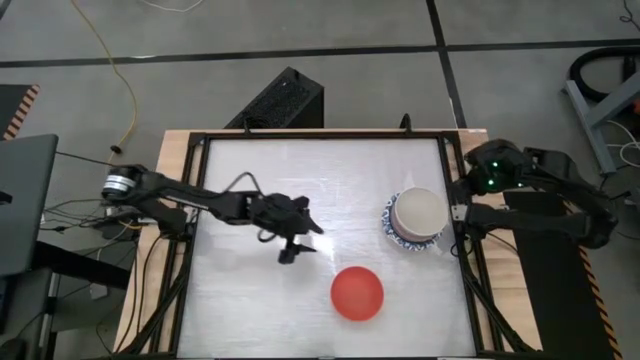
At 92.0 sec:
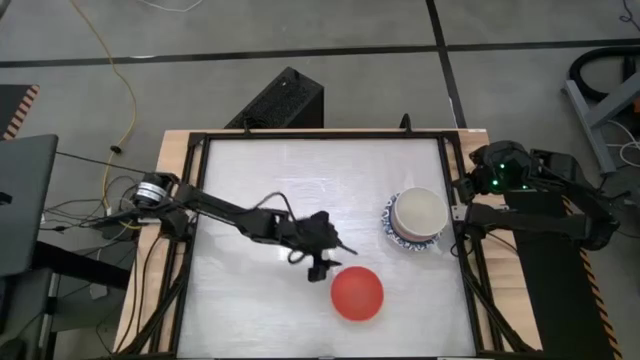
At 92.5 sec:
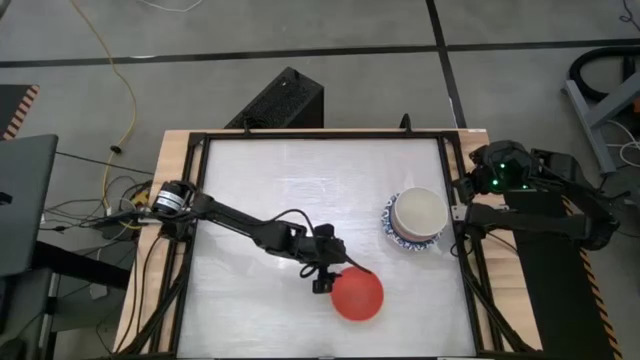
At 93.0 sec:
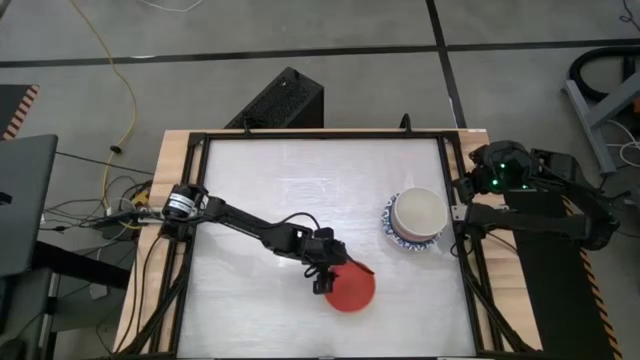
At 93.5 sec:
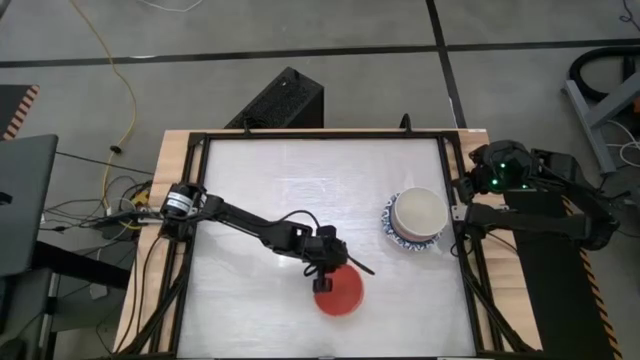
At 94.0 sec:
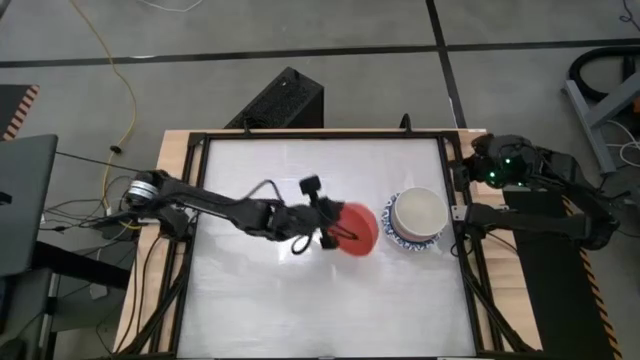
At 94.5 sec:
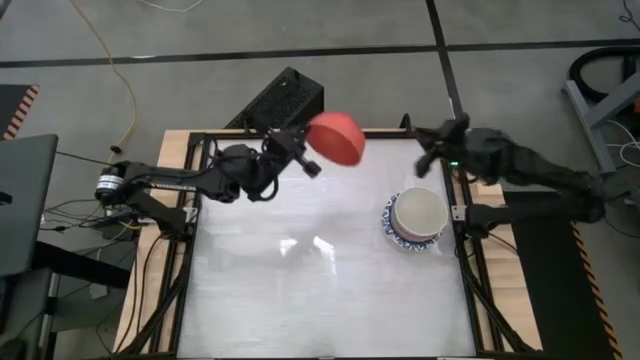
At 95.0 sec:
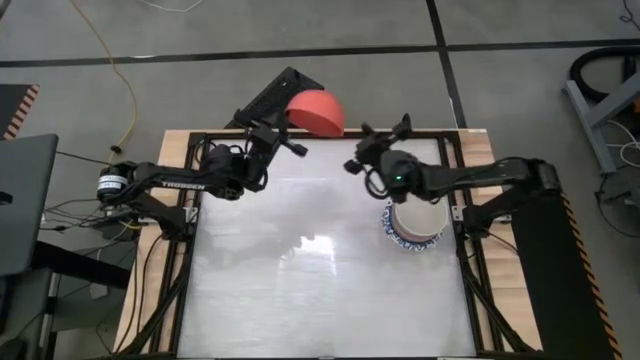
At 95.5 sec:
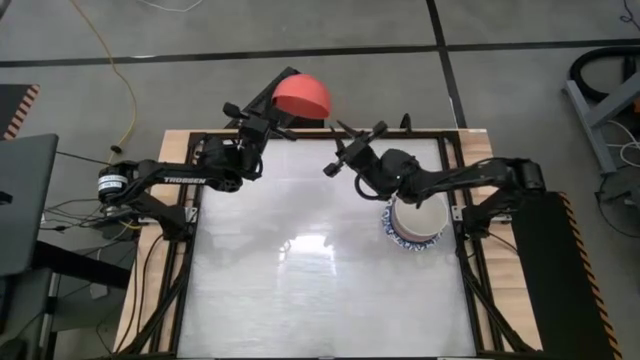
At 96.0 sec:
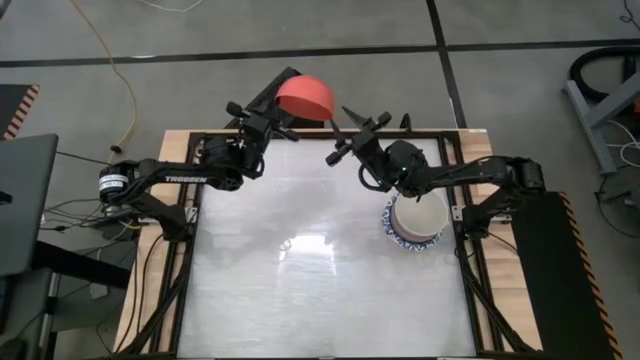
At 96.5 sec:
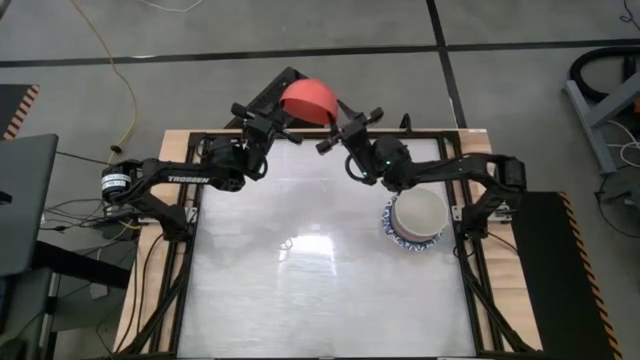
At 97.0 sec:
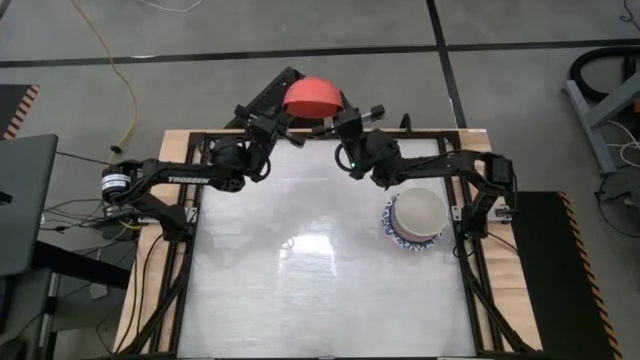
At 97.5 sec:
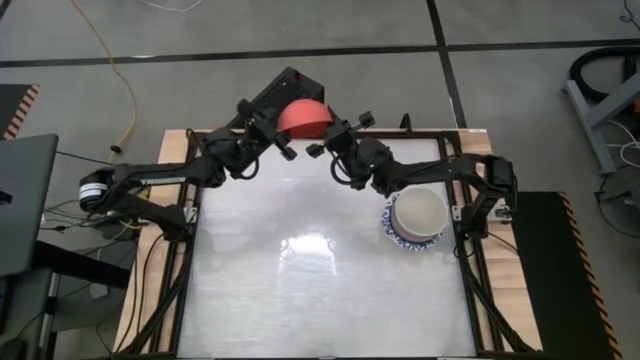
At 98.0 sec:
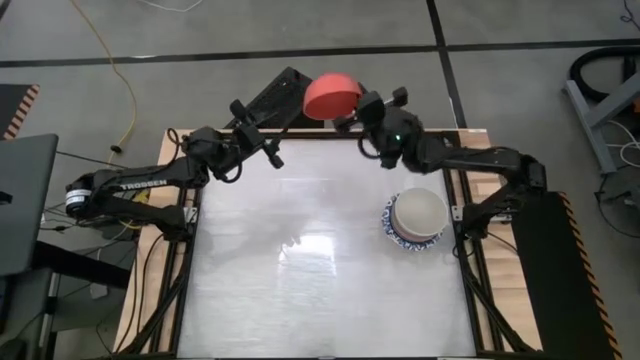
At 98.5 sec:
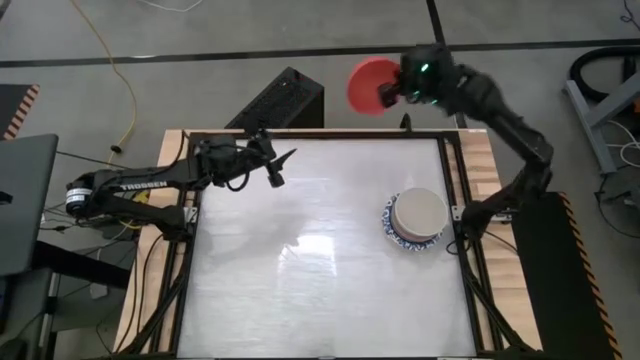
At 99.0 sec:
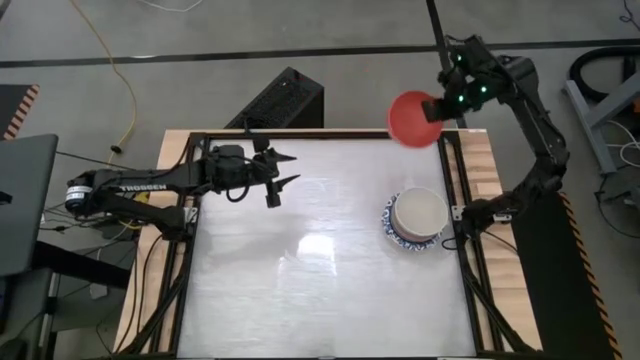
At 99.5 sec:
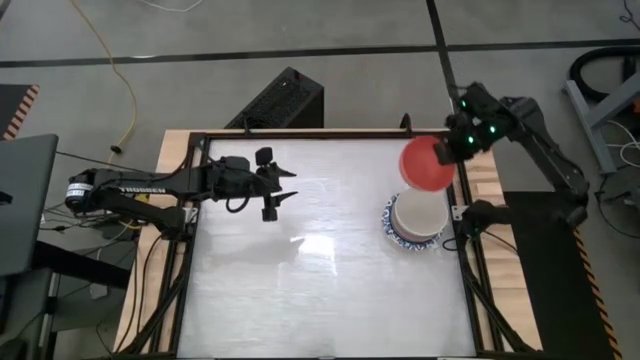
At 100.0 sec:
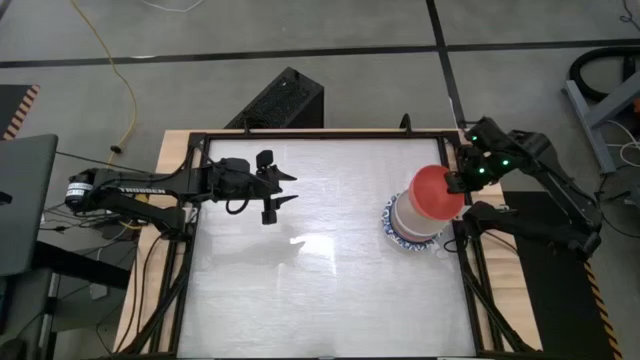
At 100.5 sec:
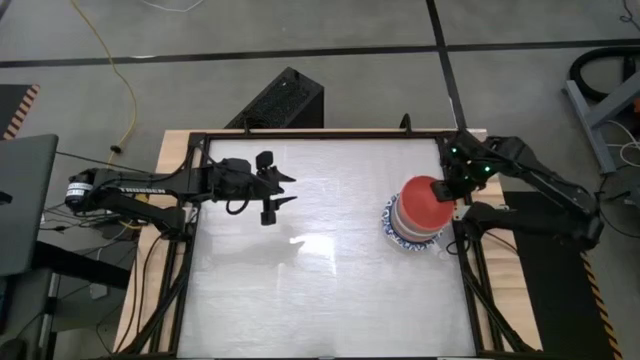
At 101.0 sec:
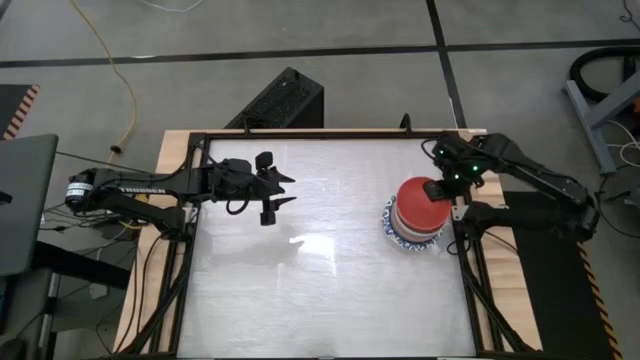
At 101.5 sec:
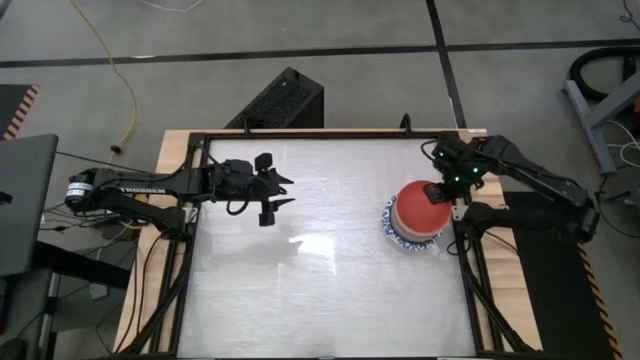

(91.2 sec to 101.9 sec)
Stack the orange bowl on top of the white bowl

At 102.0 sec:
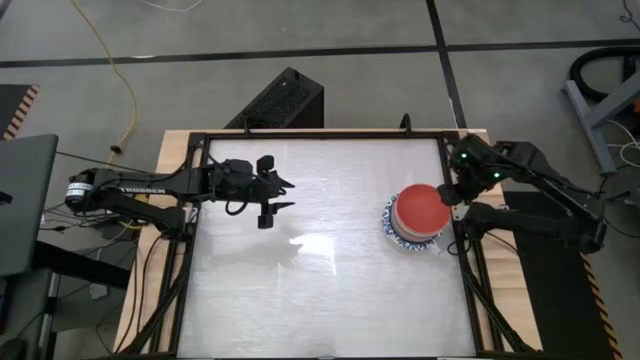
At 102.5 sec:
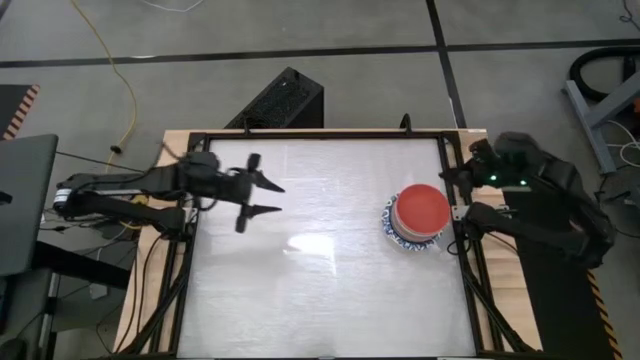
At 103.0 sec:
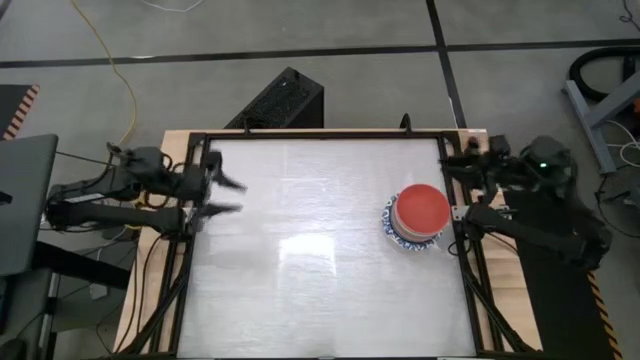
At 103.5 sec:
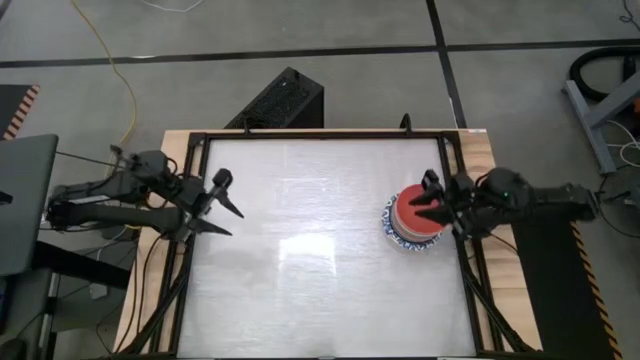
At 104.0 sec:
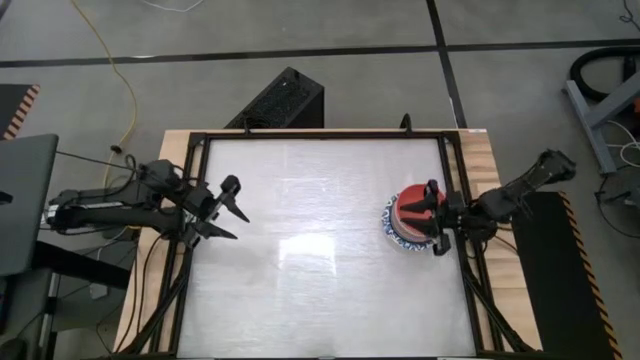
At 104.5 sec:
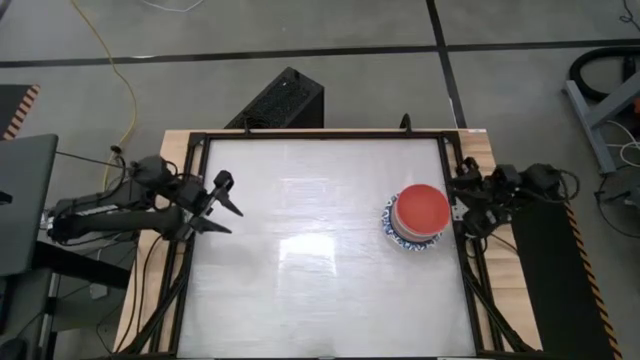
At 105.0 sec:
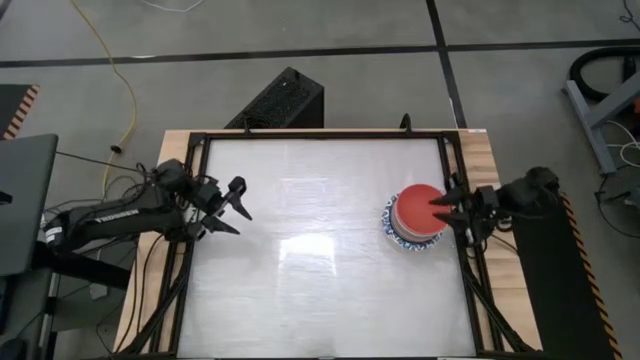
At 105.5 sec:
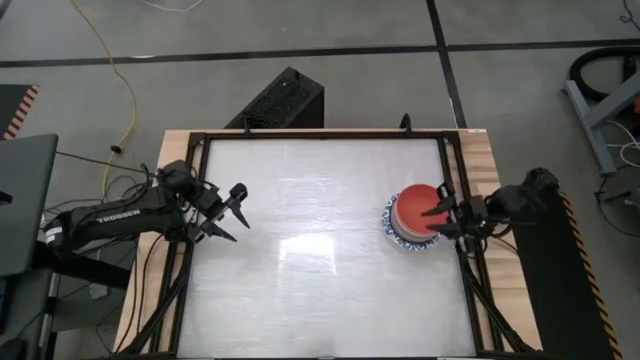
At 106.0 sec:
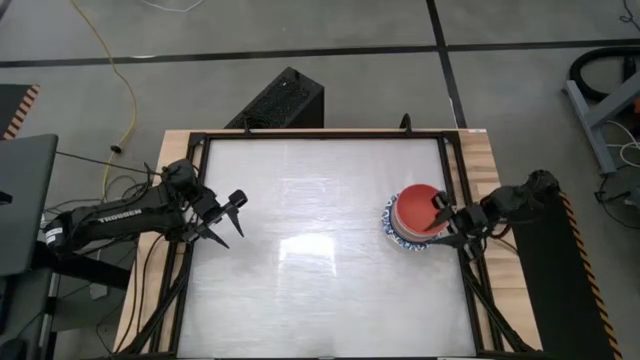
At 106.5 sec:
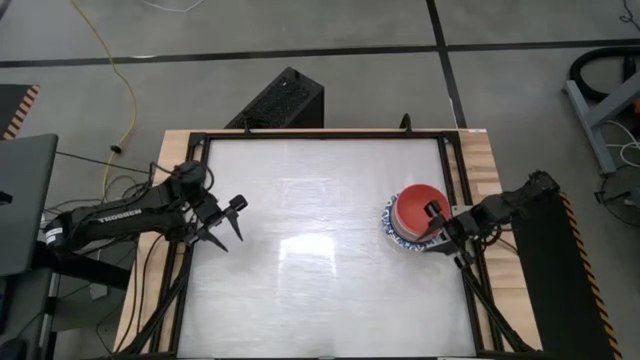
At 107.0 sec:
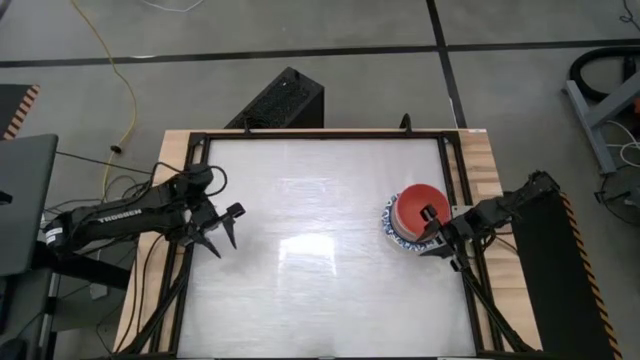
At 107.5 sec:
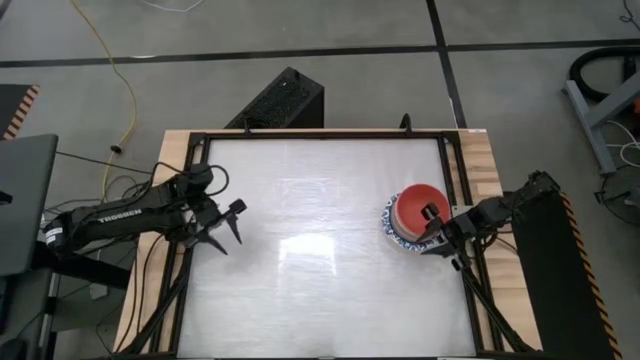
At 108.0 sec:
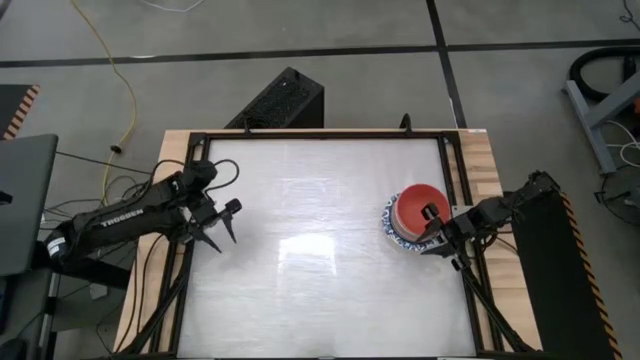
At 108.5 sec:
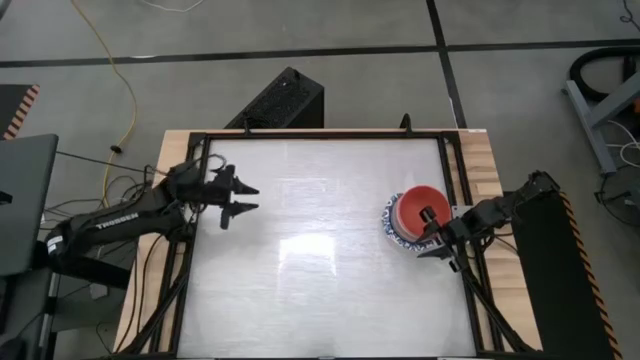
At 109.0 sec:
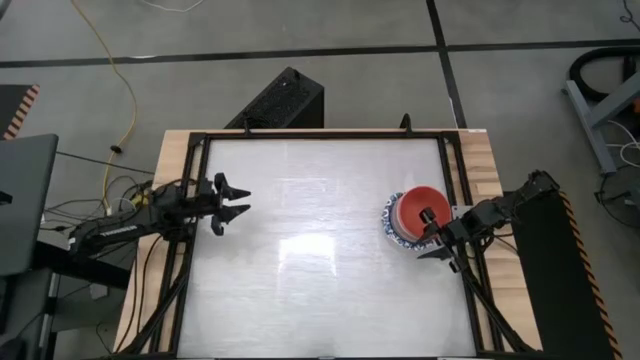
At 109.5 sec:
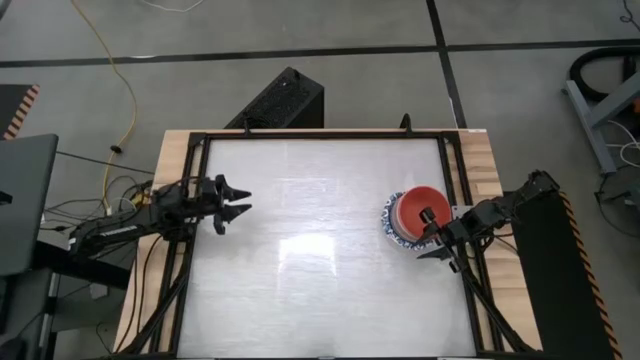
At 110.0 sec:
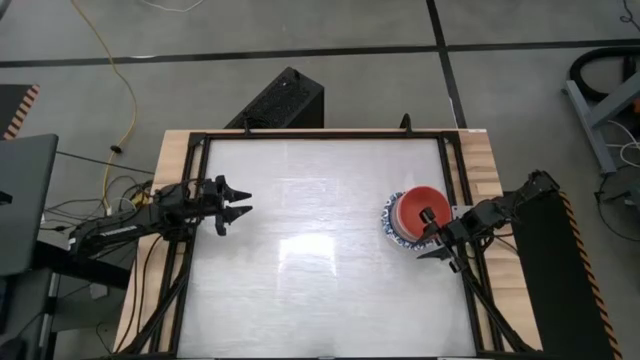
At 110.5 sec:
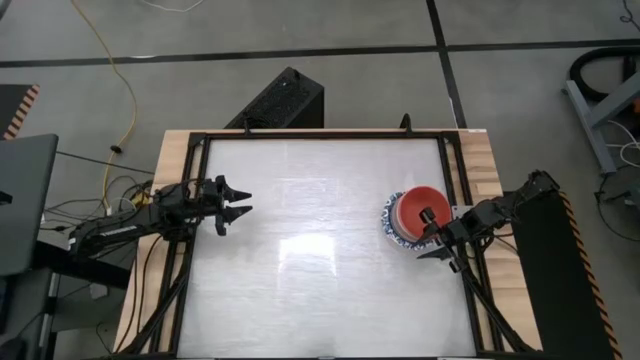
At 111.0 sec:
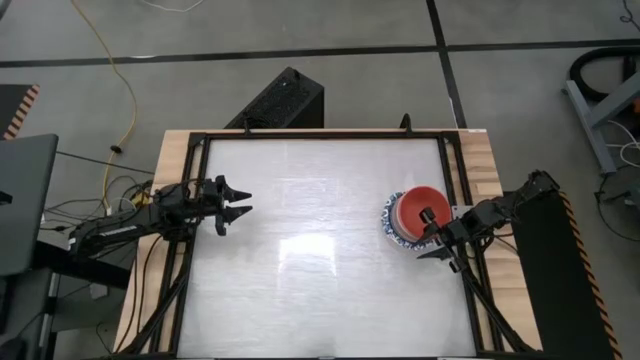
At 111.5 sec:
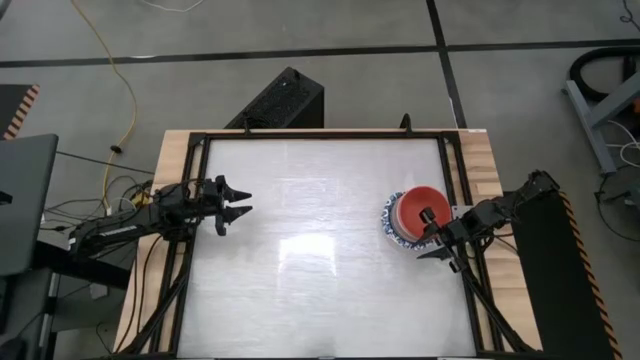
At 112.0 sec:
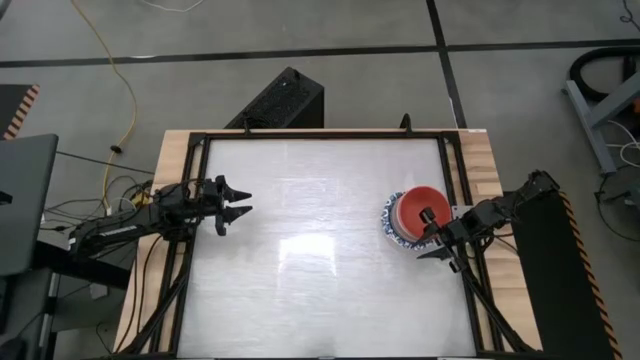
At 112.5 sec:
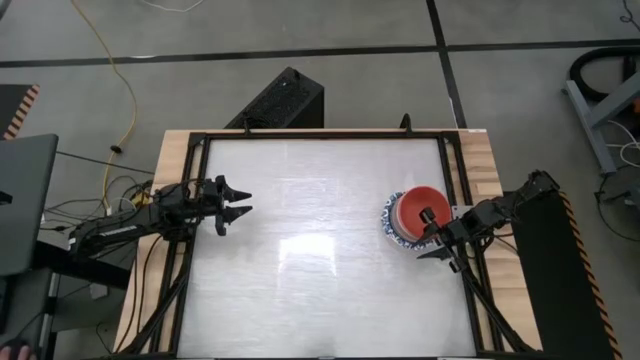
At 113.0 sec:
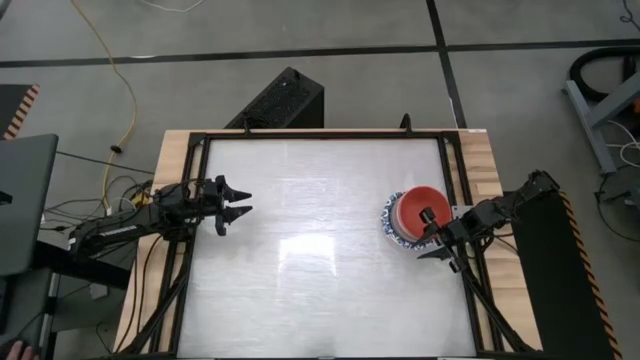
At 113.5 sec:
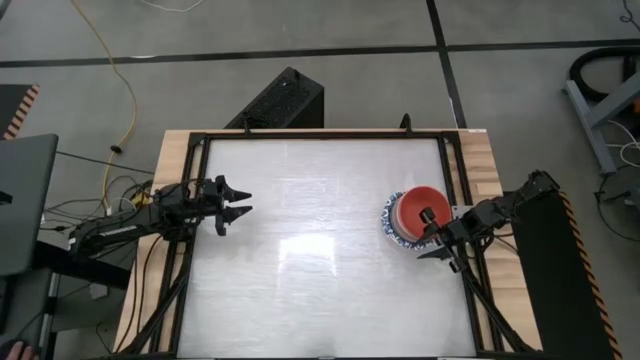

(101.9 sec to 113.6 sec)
Return to Home Position
